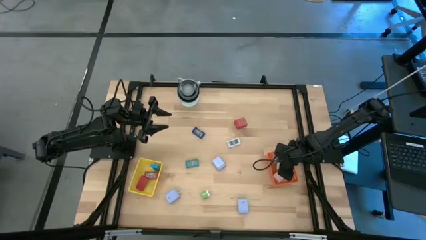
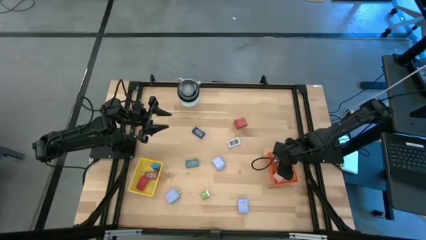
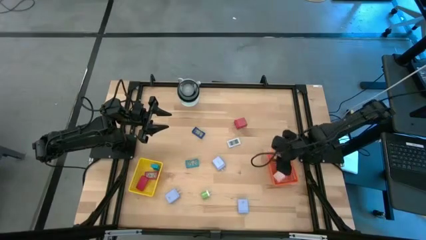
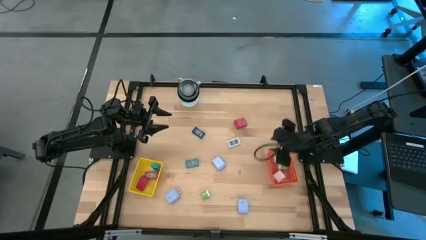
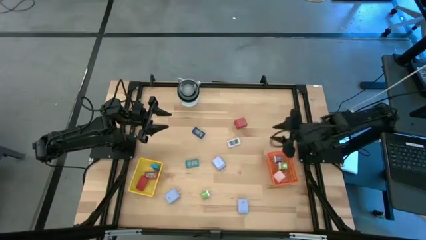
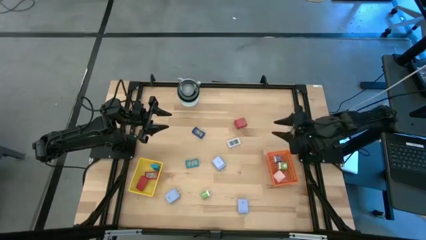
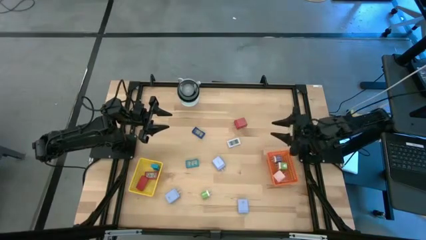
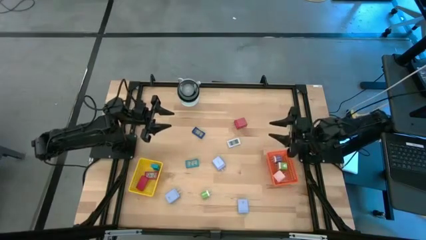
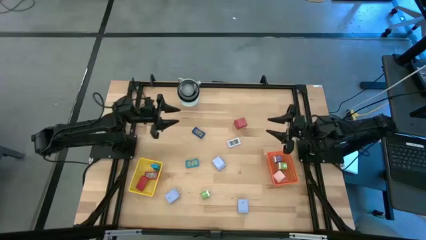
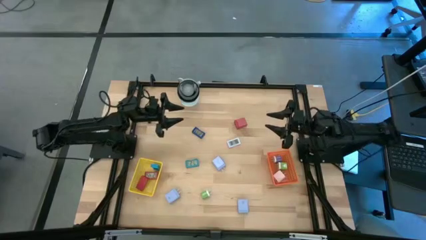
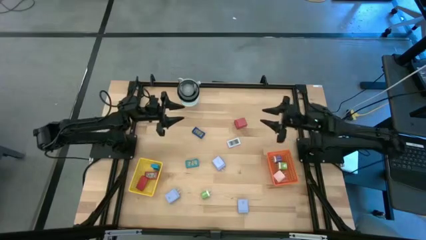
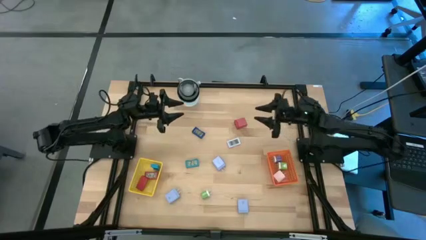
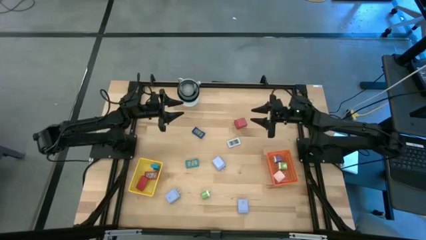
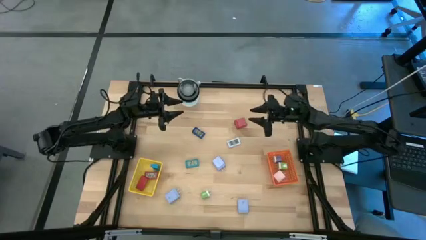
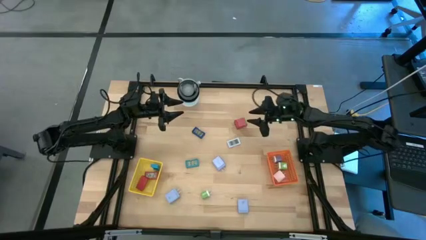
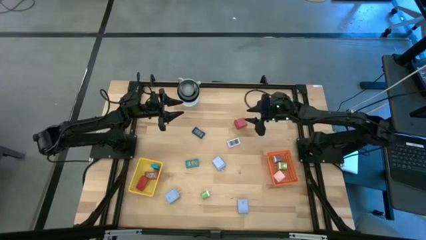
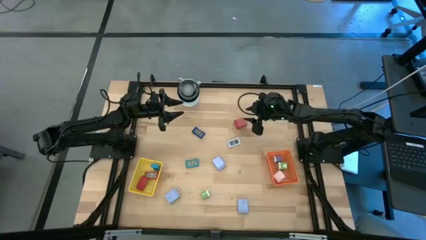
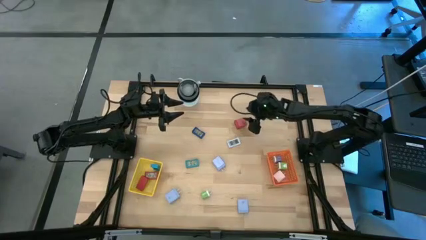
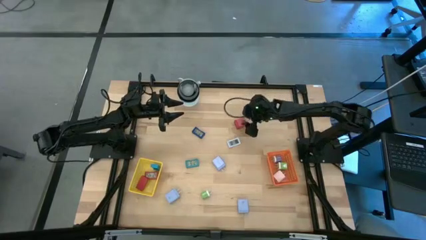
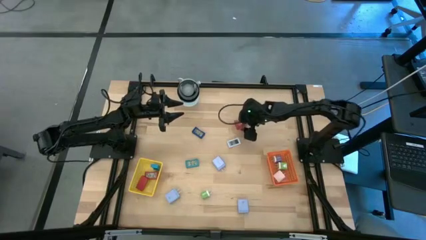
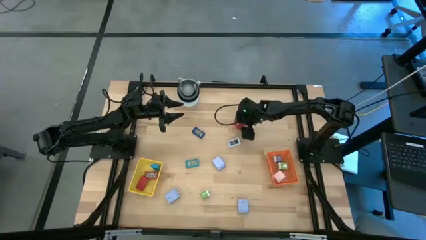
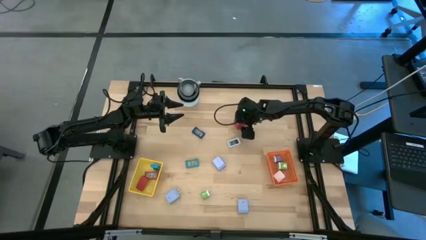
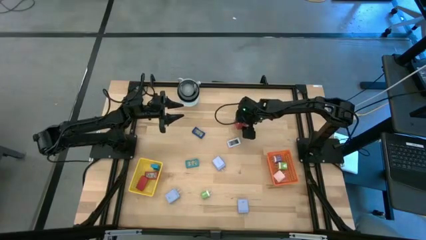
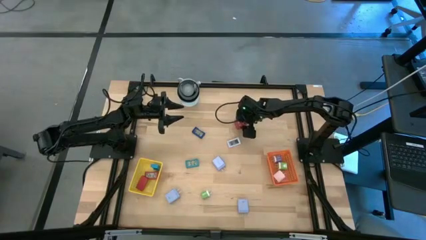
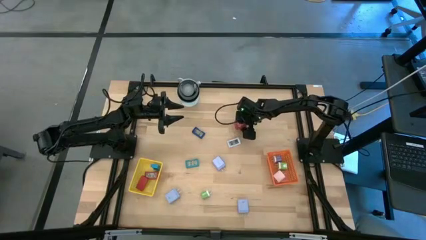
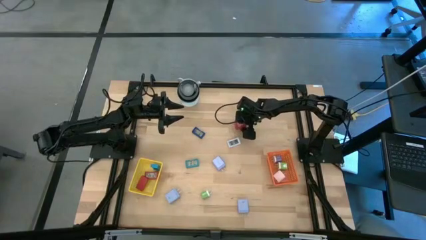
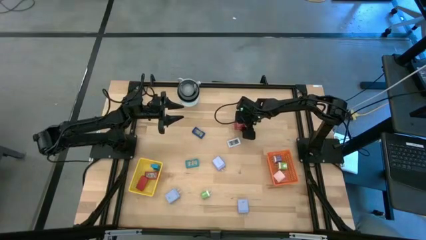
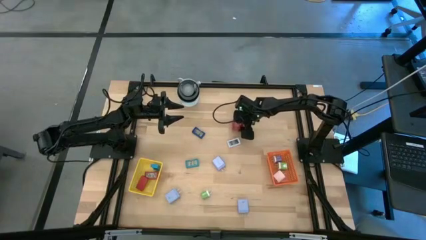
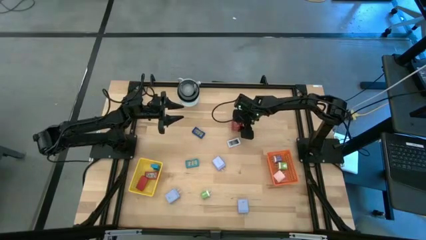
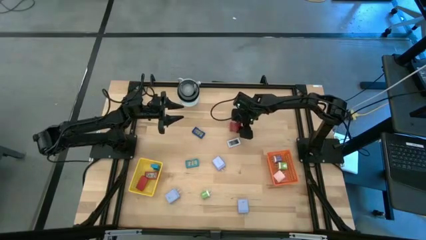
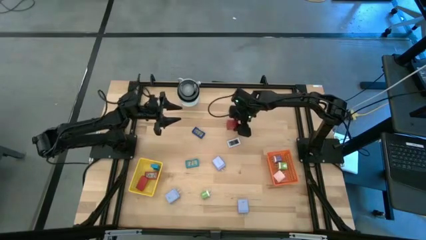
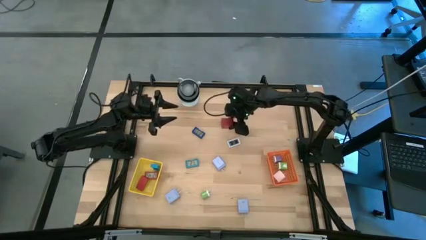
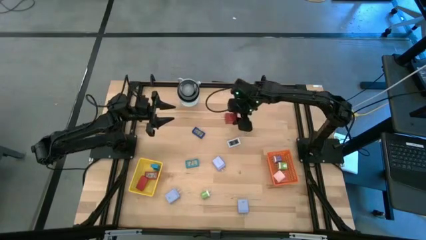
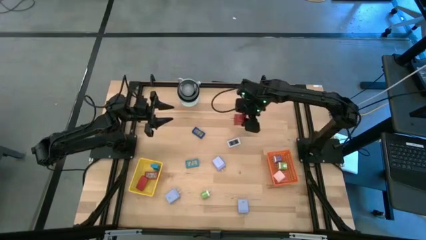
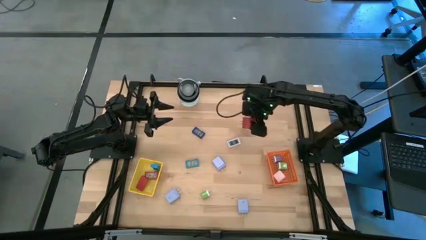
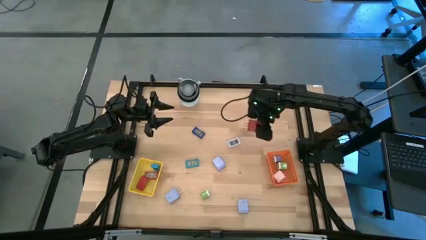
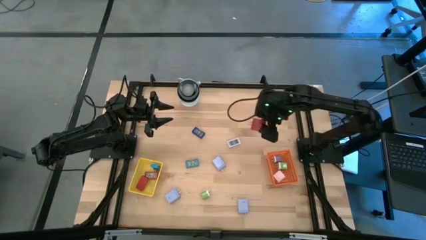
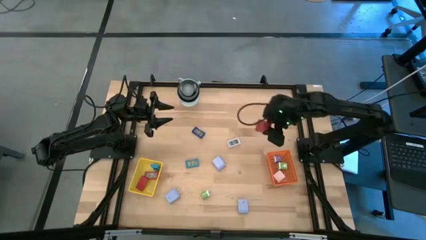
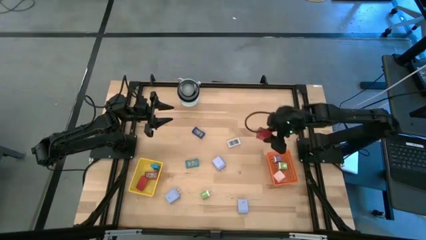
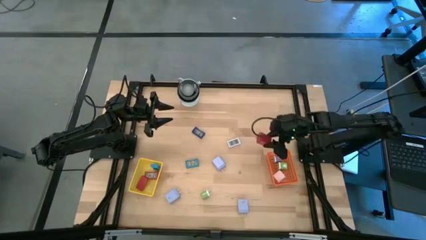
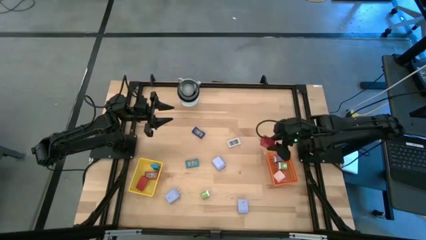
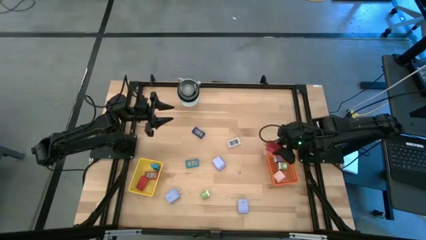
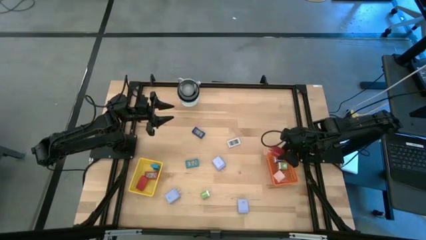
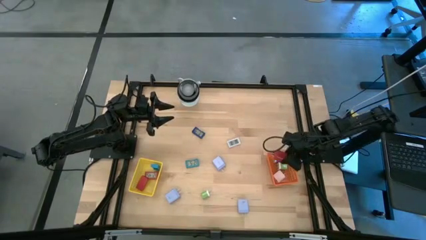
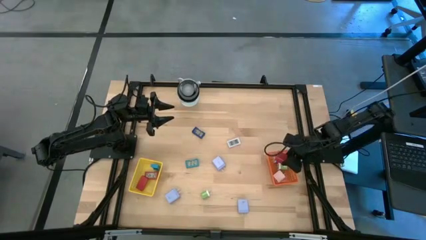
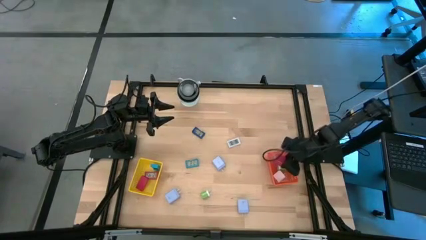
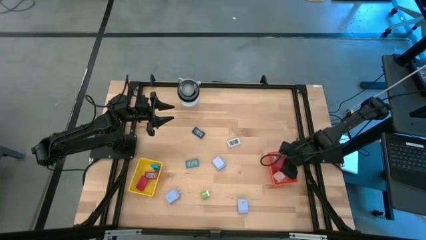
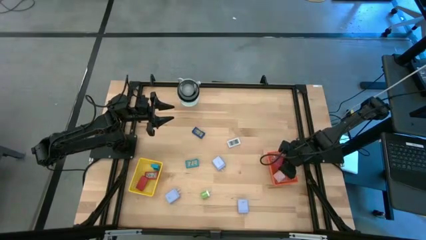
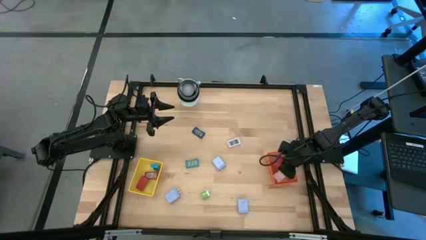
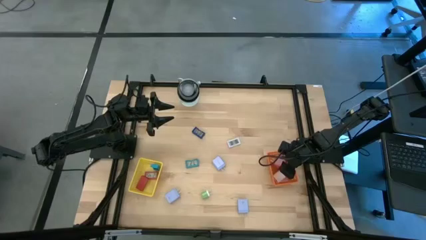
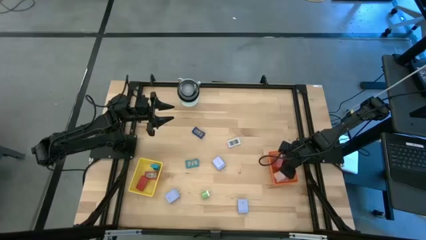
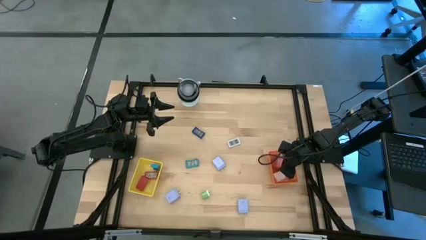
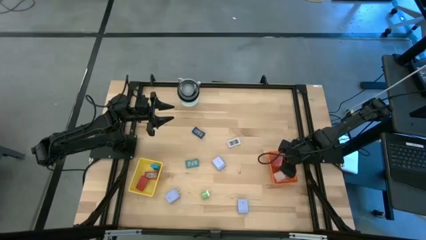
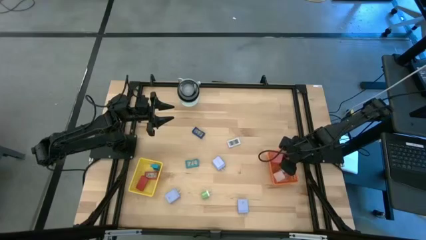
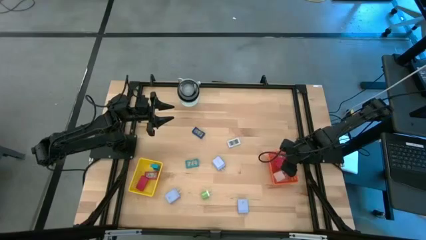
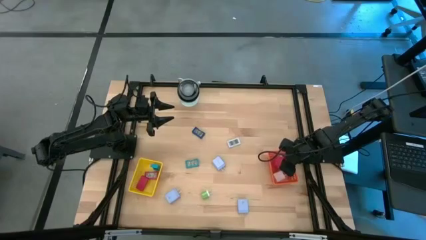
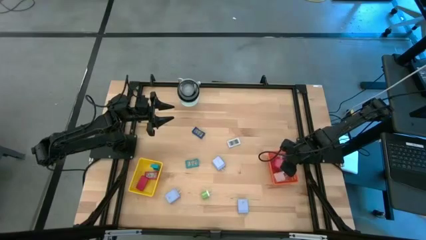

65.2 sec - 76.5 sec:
Task: Pick & Place Office items
Put the red charger adapter into the orange basket

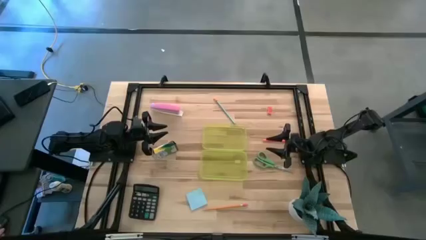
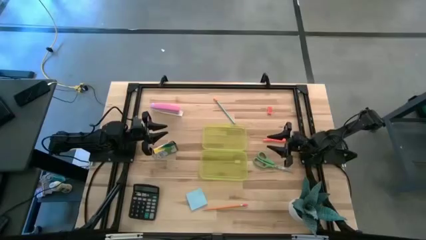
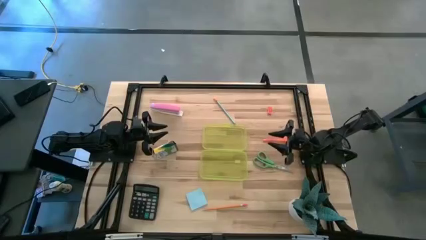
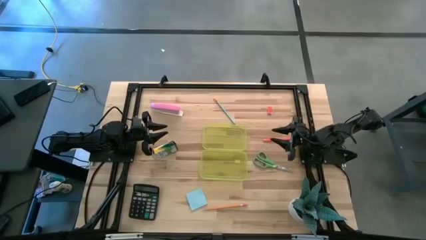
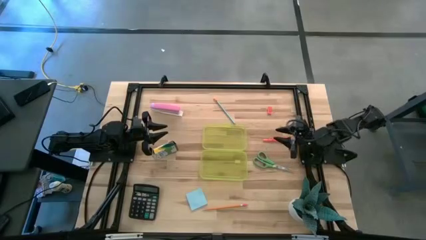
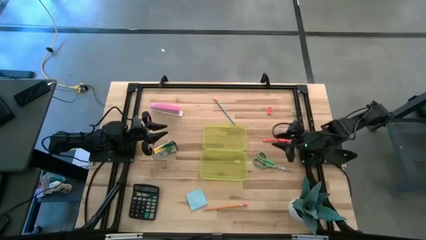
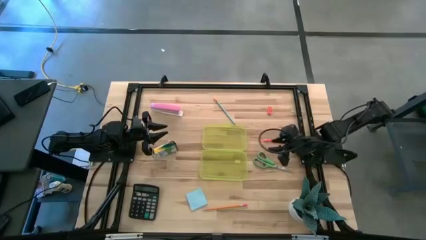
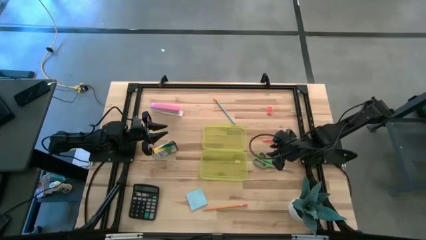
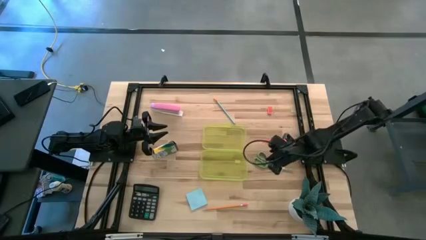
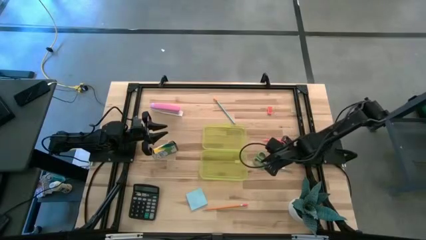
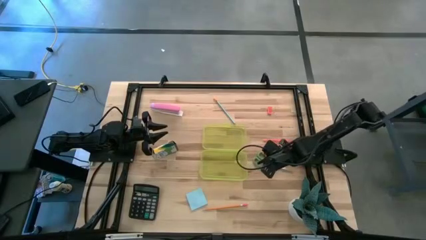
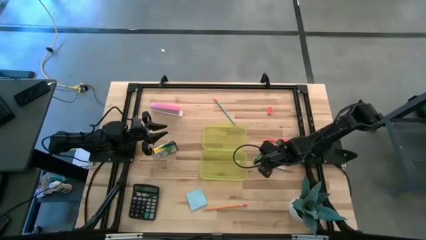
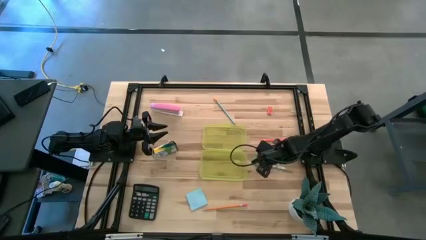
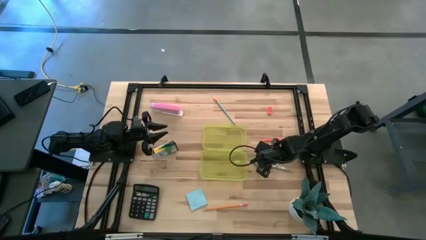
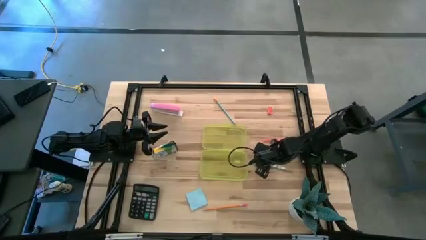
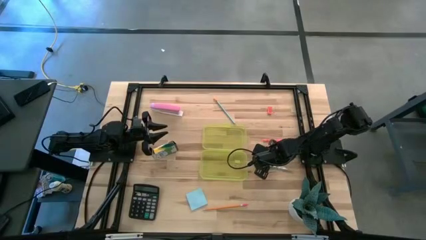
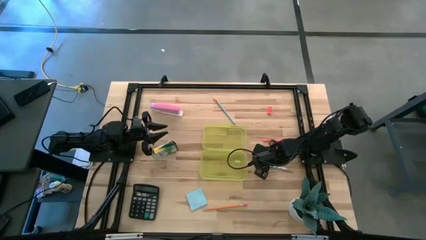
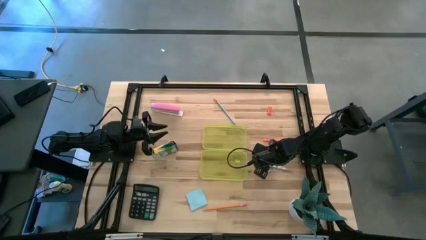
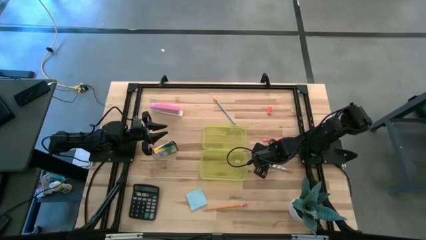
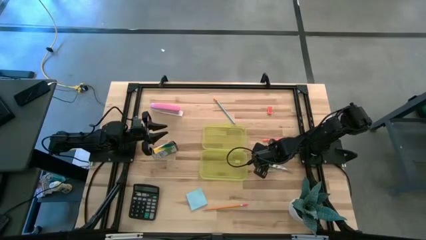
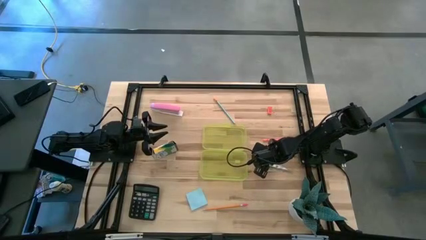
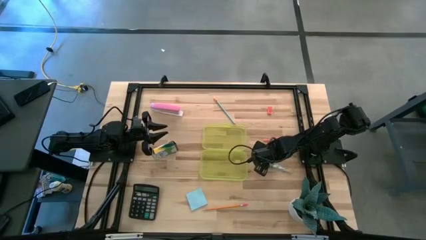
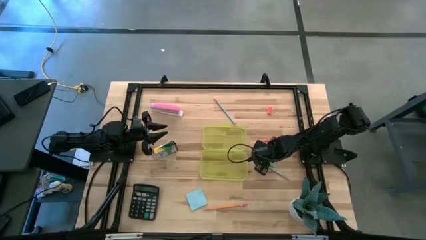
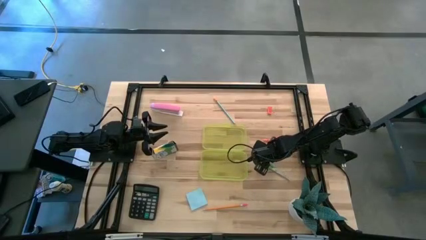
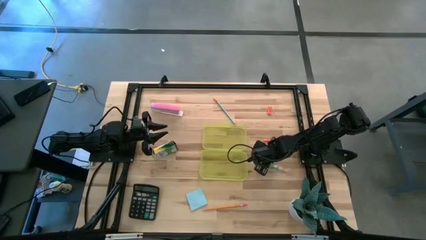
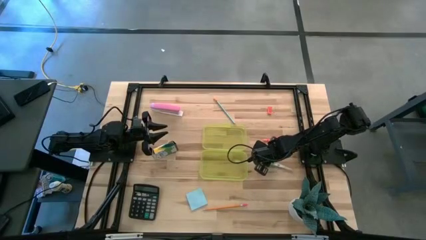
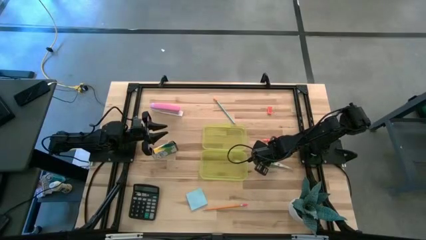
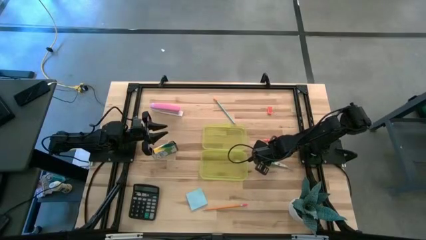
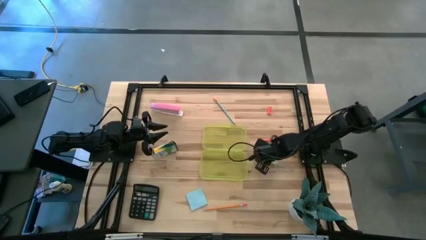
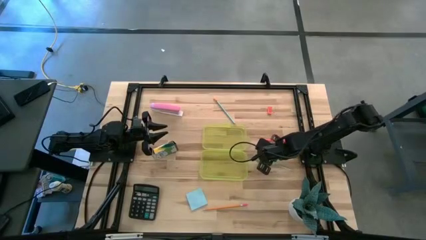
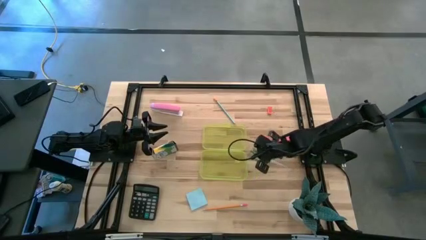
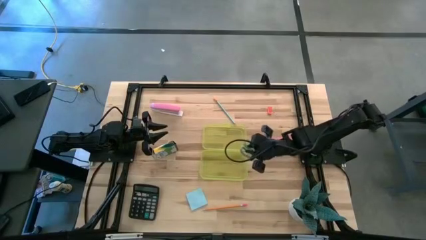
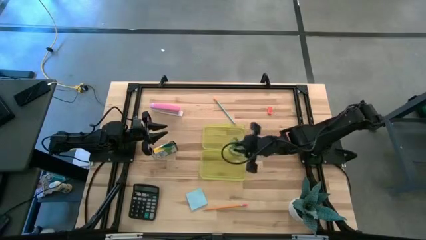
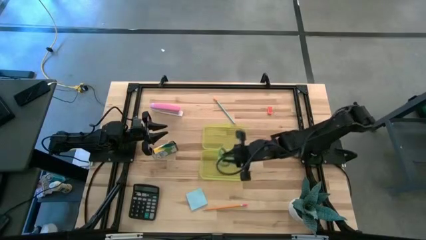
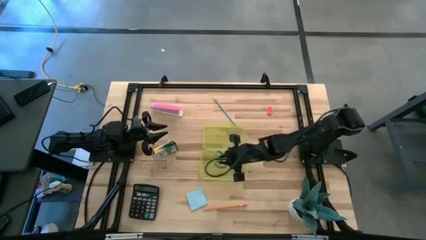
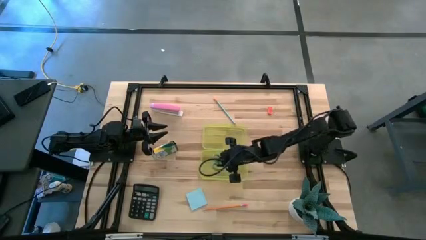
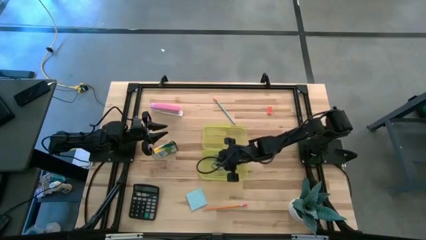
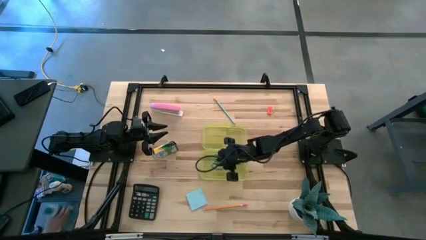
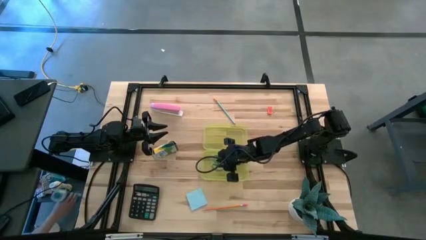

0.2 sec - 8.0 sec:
Task: Pack school essentials
Put the light green scissors into the supply box
